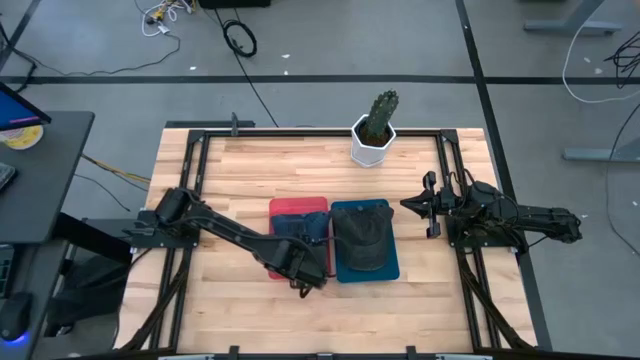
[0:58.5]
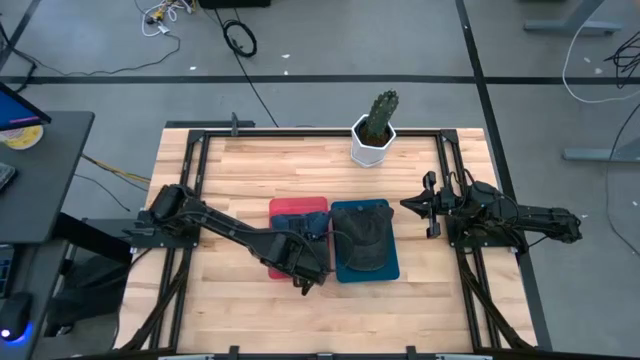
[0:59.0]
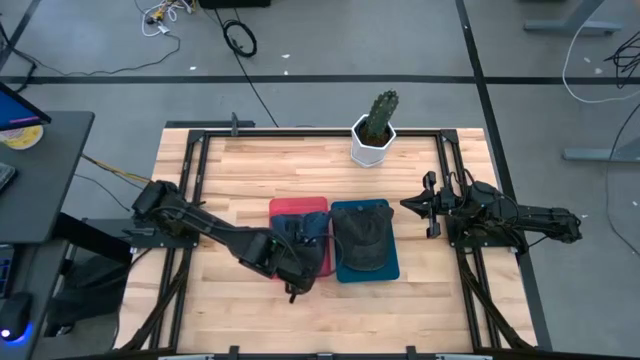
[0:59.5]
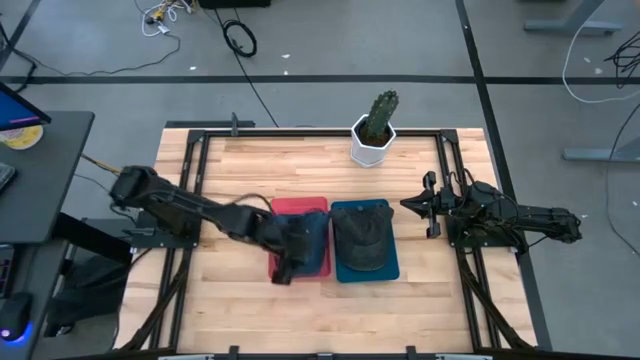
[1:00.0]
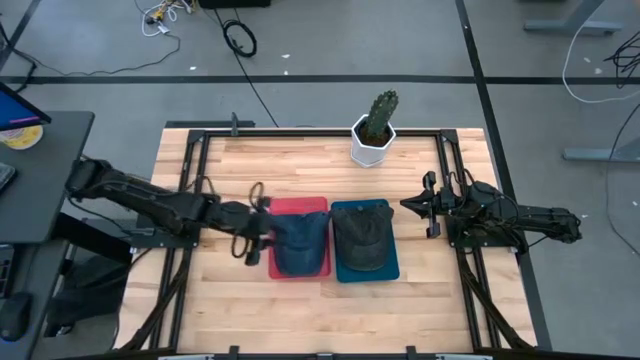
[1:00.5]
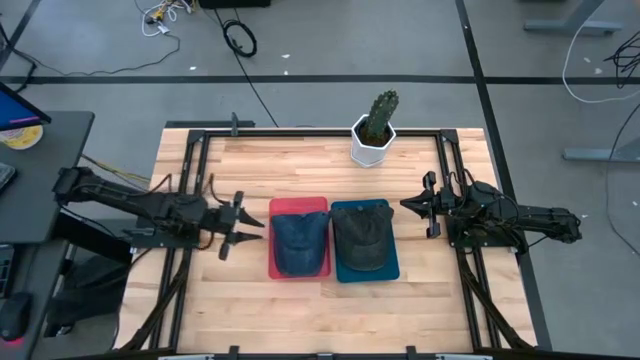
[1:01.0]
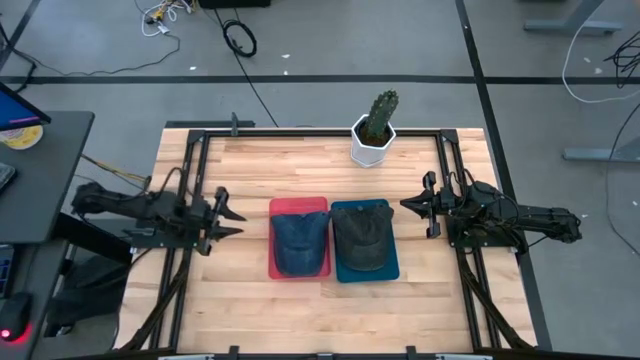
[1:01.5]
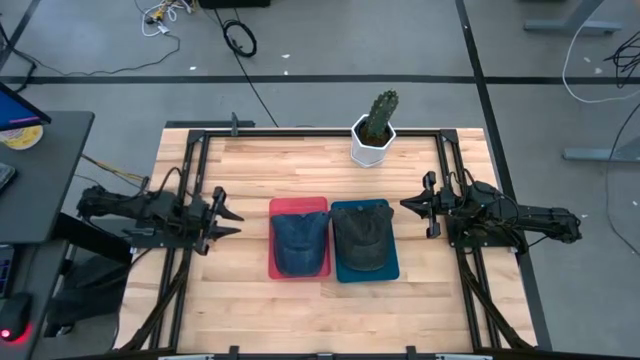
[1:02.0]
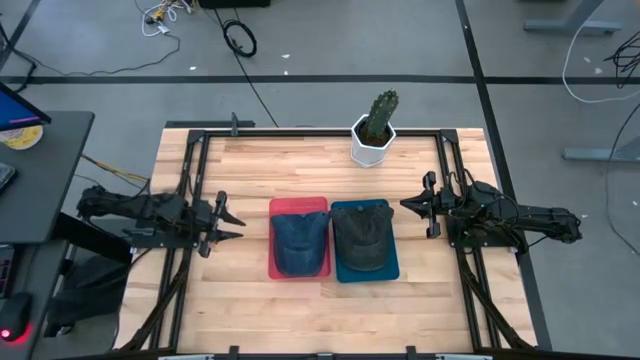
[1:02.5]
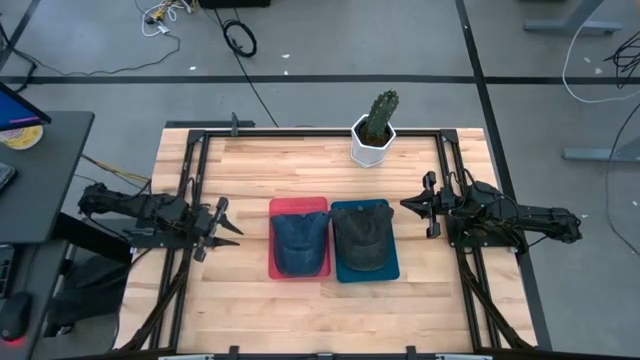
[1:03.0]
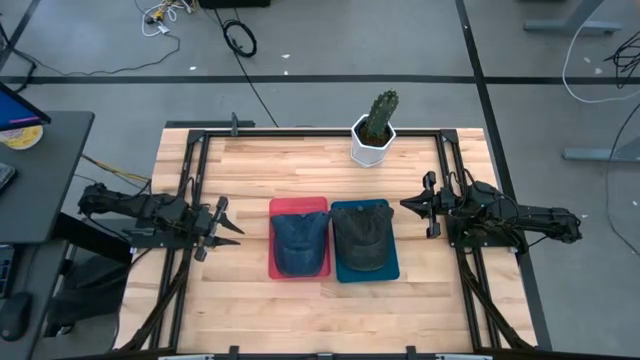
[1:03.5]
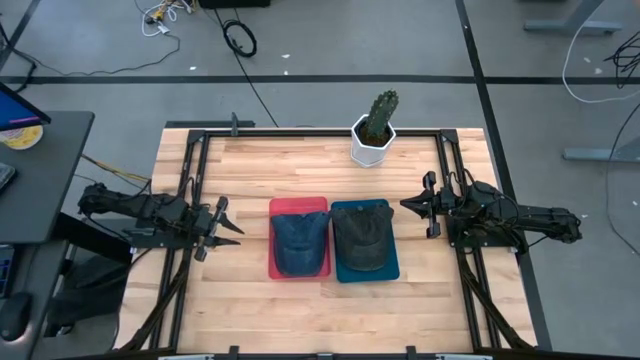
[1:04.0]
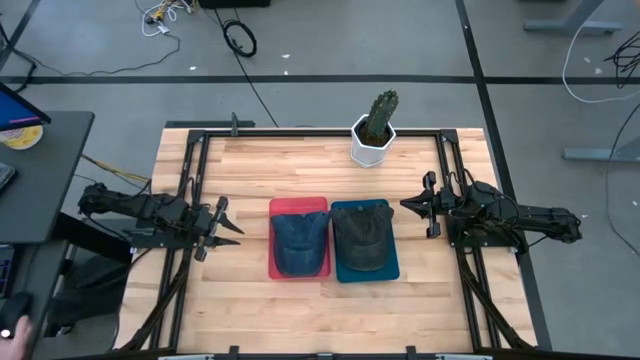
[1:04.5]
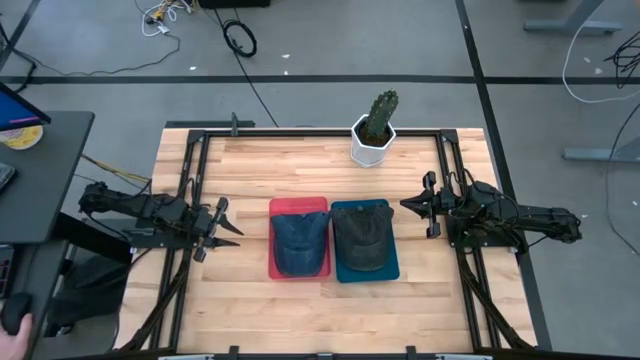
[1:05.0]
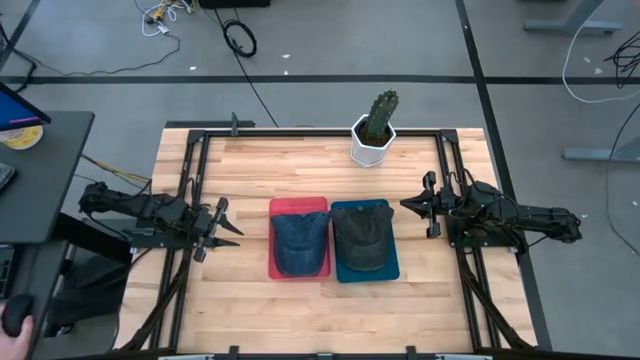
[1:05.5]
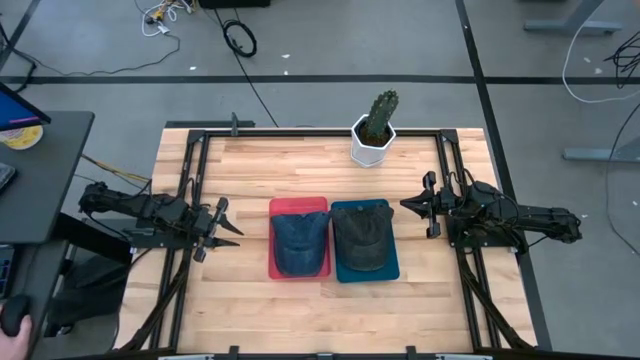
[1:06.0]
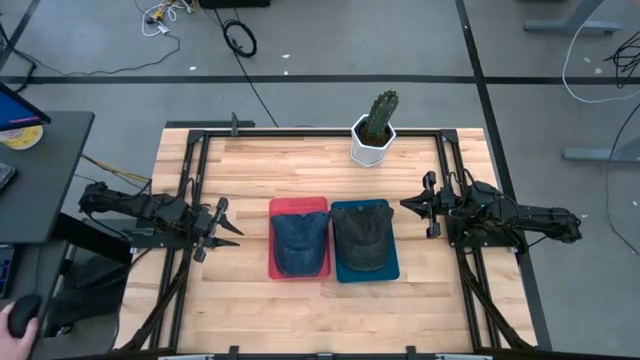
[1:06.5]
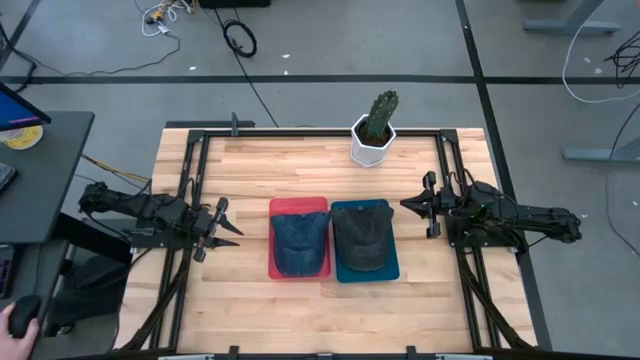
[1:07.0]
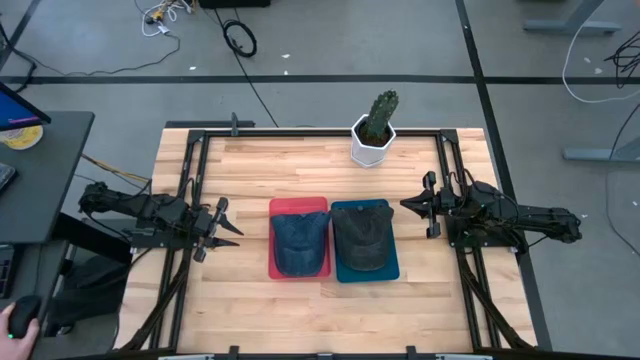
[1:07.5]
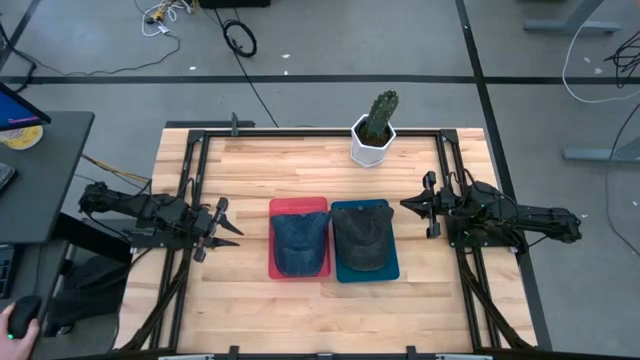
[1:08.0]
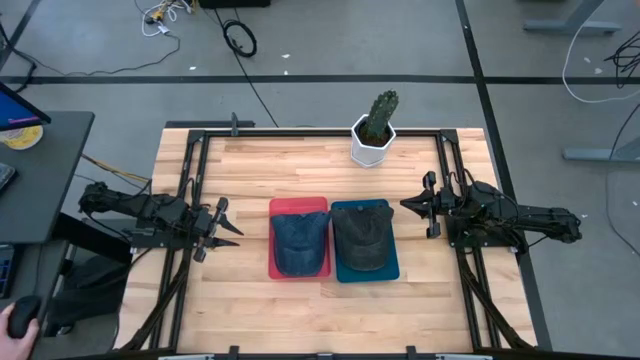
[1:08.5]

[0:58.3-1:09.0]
Task: Pick & Place hat
Return to Home Position

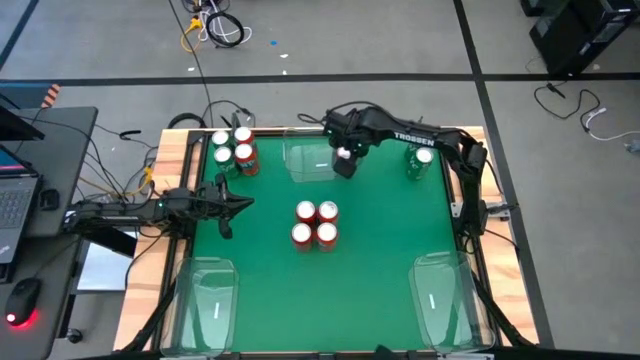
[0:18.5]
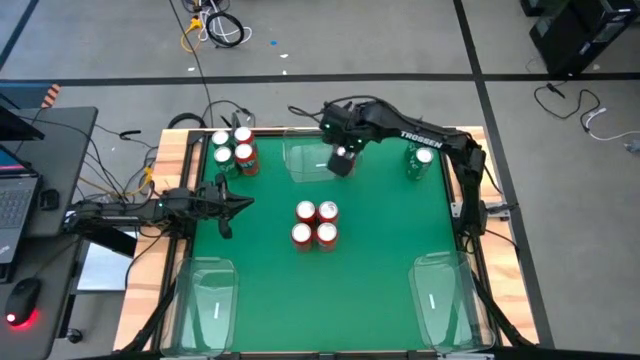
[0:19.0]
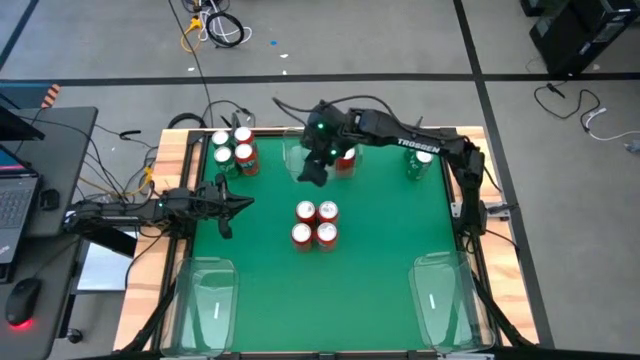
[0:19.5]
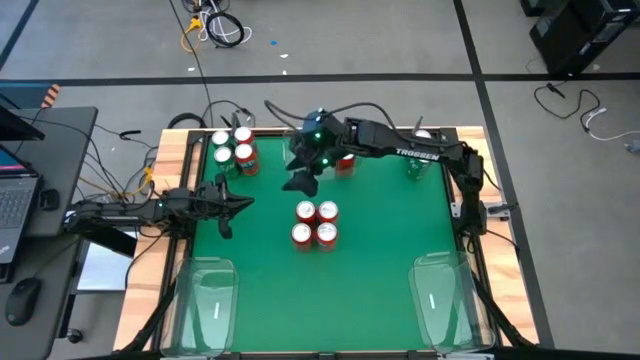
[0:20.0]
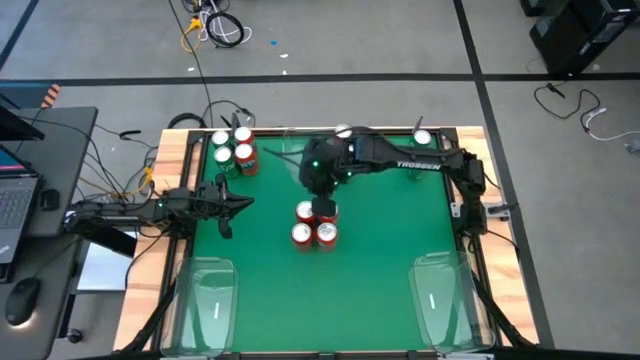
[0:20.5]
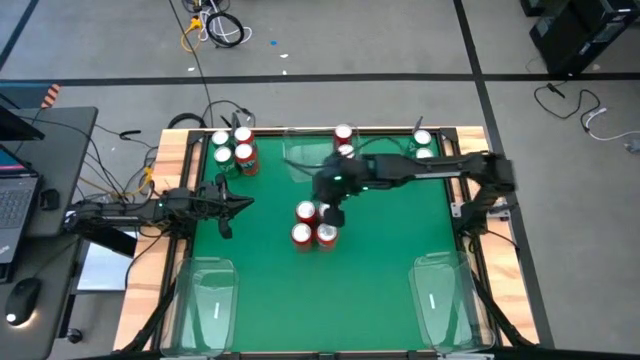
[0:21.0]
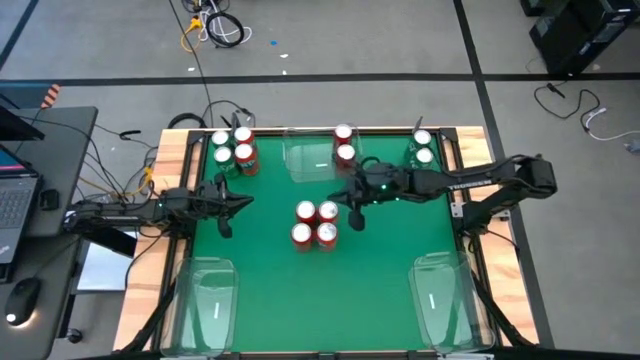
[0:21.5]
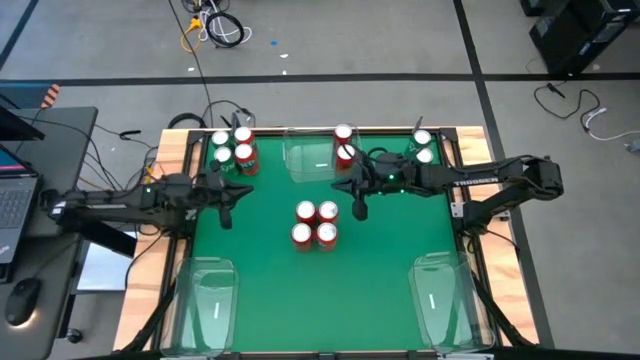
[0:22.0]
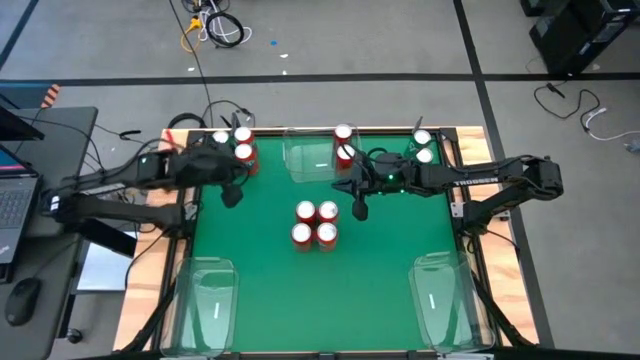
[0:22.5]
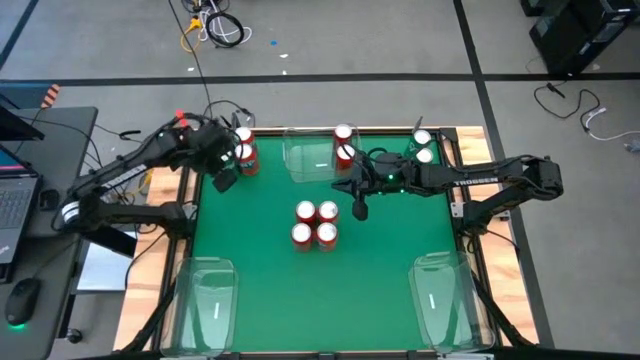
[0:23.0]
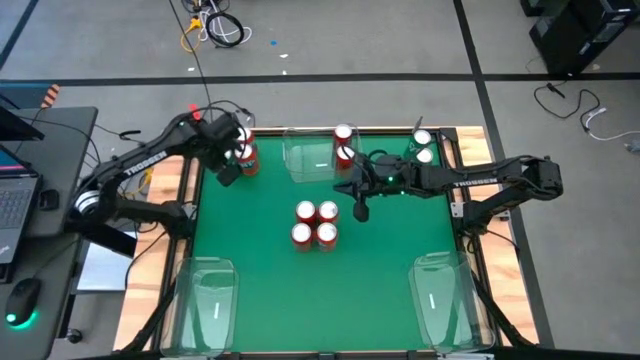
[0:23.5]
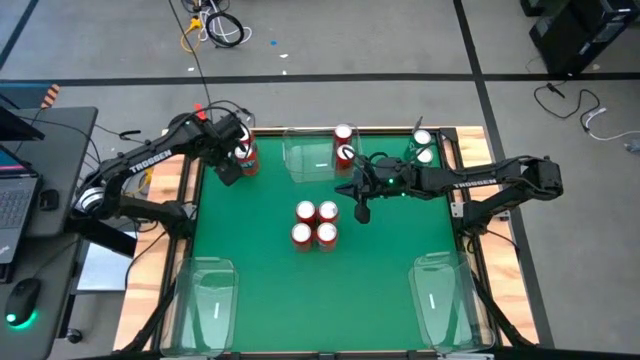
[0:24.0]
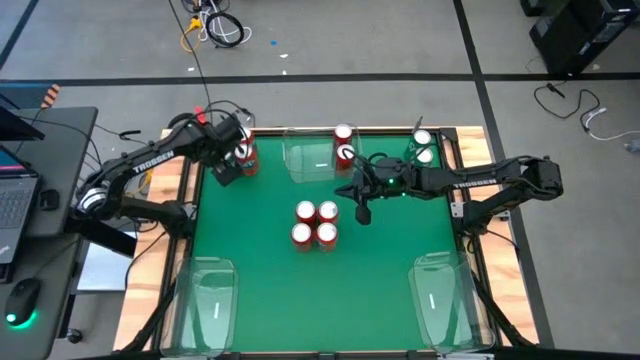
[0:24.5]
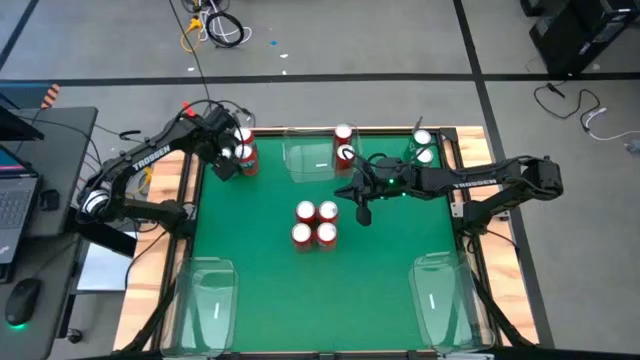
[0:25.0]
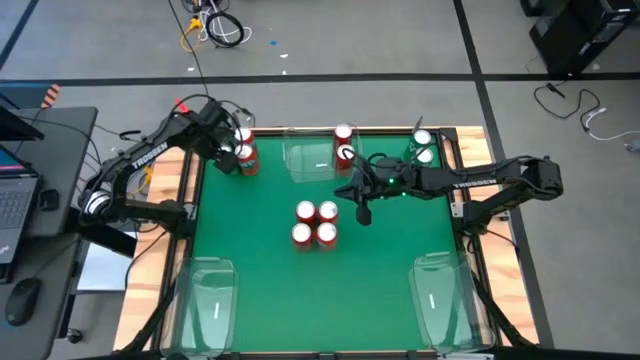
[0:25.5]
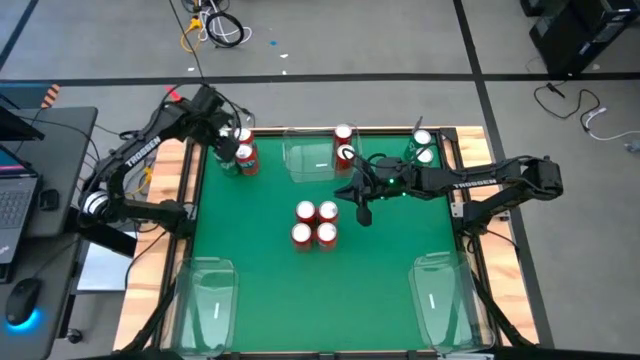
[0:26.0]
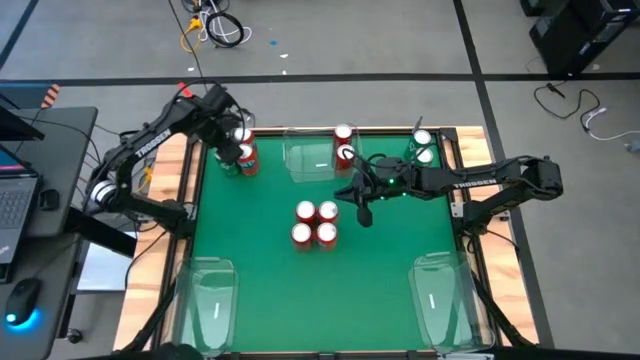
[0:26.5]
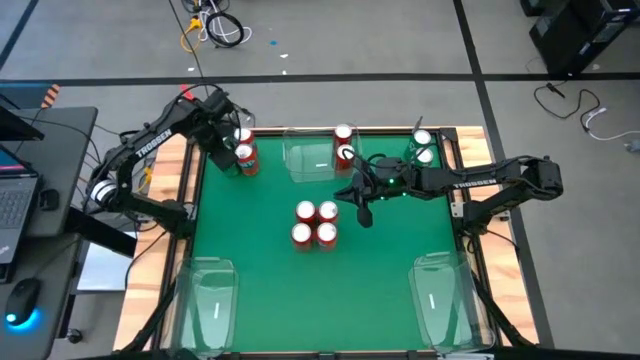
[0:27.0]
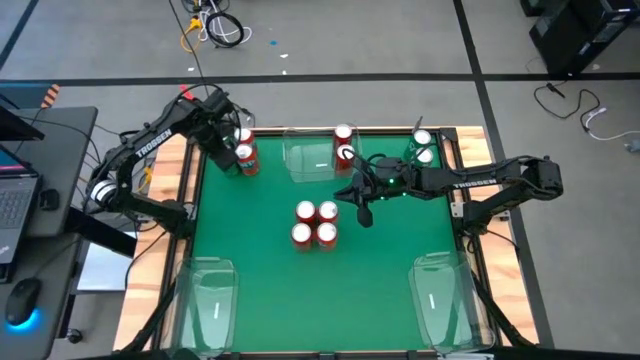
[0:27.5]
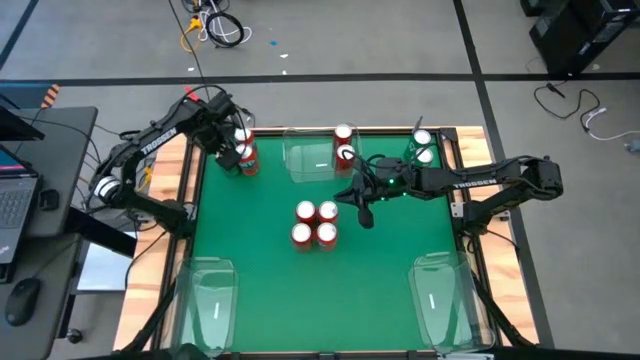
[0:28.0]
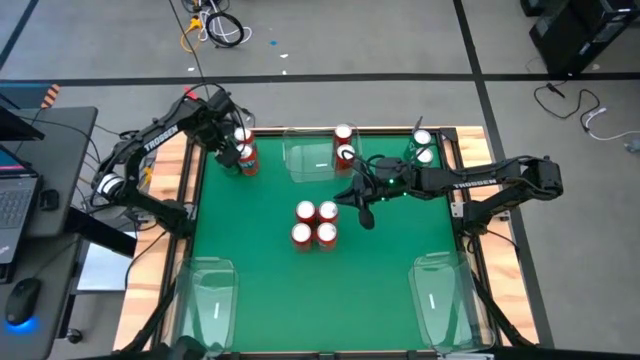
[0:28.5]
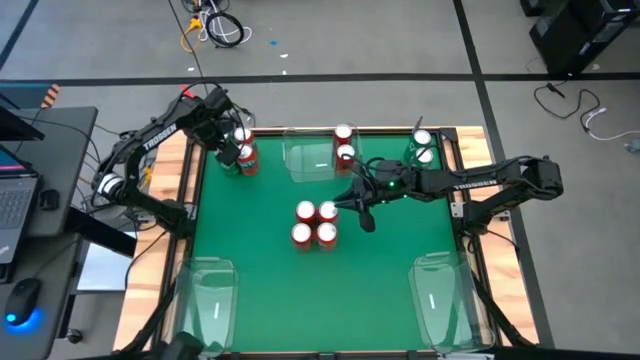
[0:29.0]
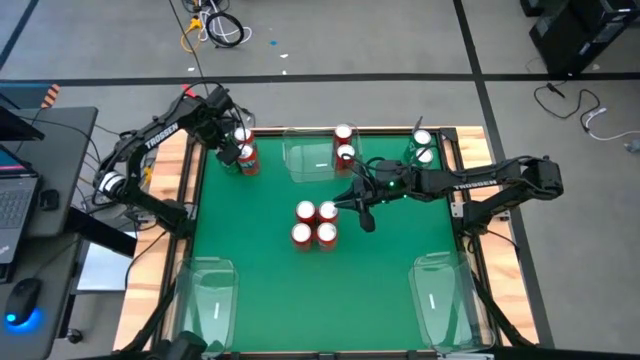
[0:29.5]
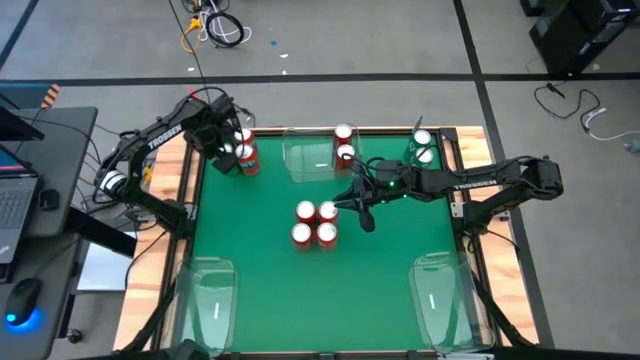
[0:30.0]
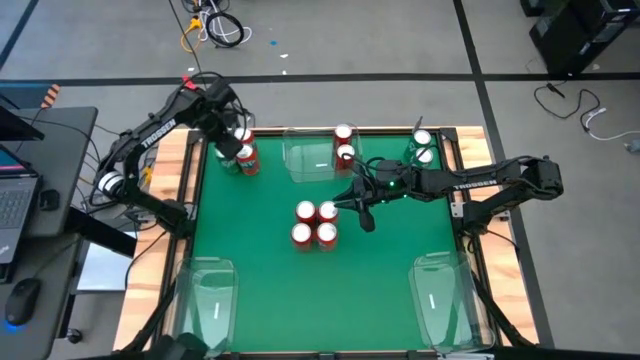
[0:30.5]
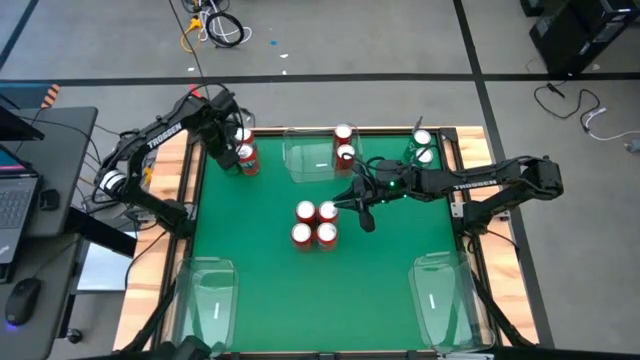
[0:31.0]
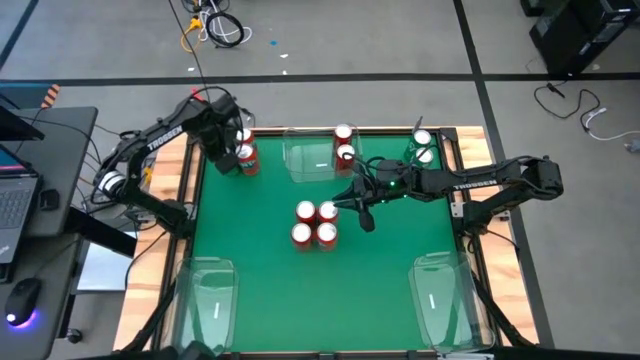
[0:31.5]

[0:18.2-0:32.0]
Task: Sort soda cans
Put the green soda can into the bottom left transparent bin
